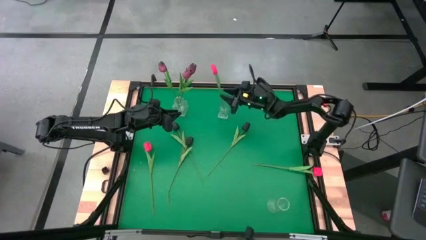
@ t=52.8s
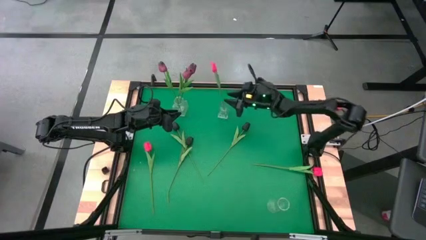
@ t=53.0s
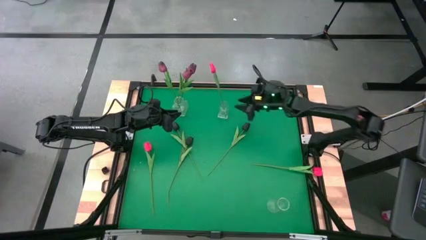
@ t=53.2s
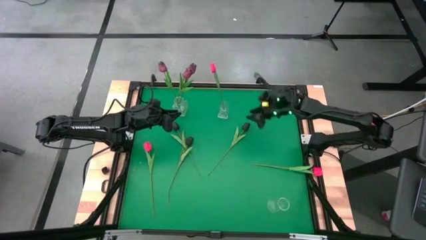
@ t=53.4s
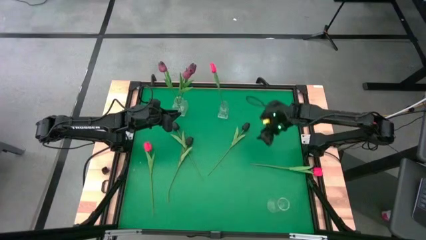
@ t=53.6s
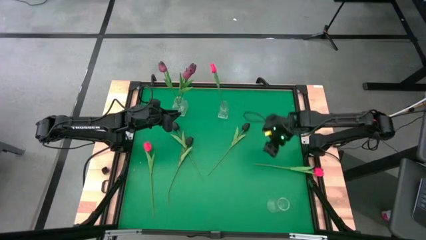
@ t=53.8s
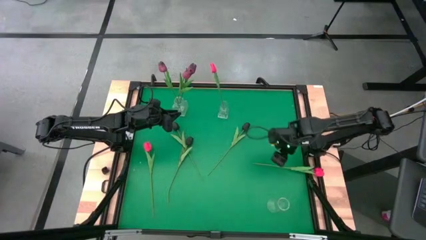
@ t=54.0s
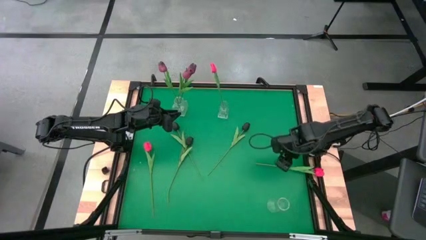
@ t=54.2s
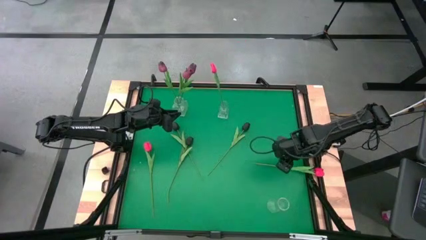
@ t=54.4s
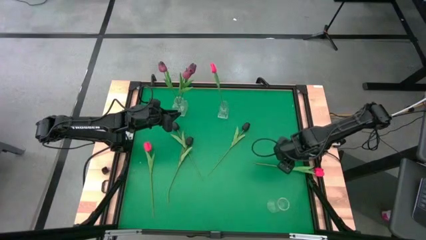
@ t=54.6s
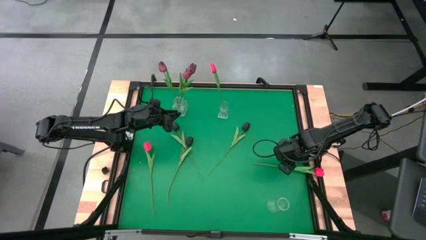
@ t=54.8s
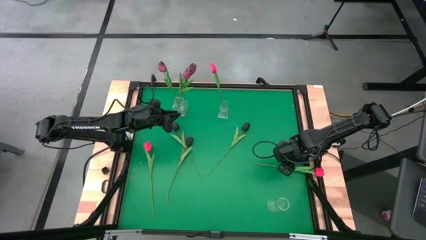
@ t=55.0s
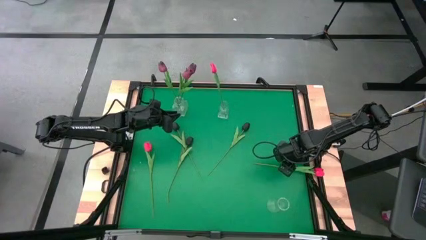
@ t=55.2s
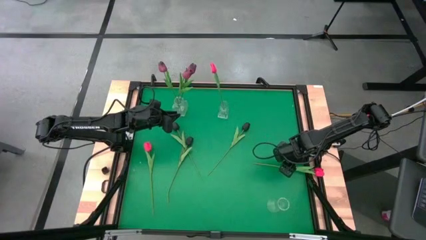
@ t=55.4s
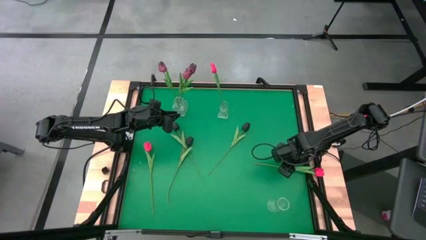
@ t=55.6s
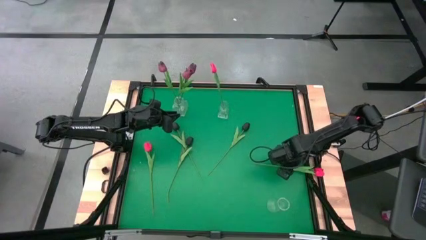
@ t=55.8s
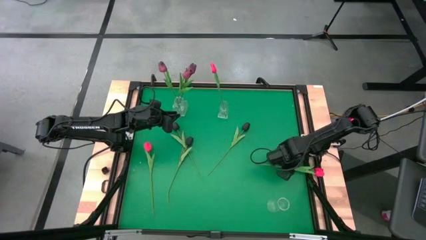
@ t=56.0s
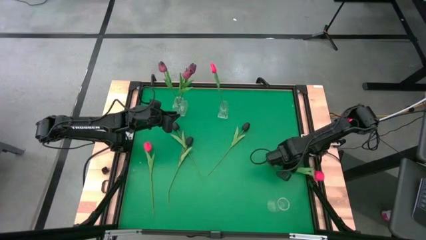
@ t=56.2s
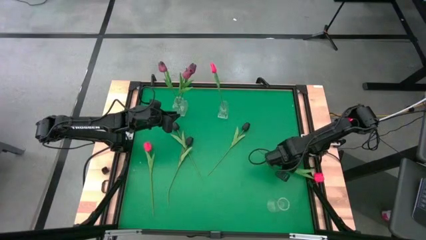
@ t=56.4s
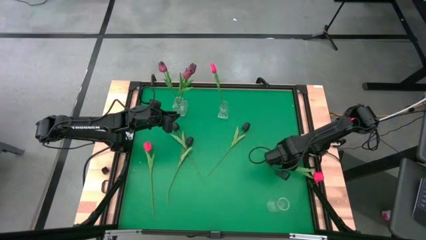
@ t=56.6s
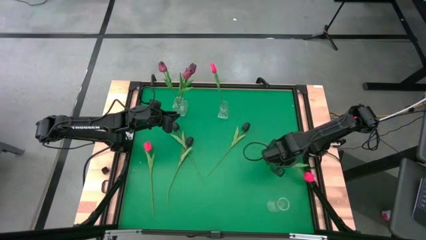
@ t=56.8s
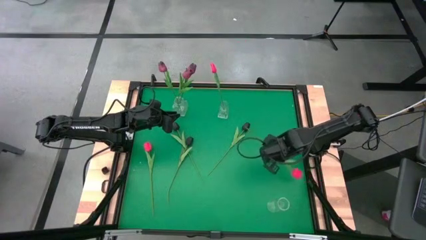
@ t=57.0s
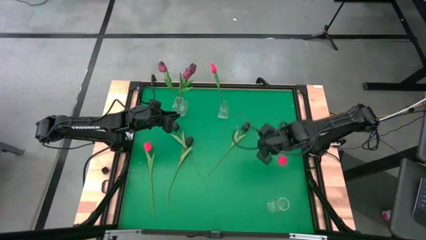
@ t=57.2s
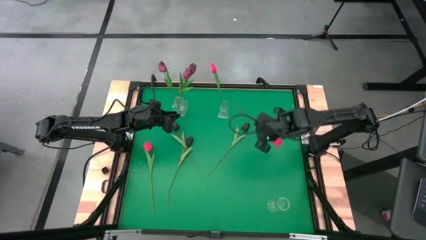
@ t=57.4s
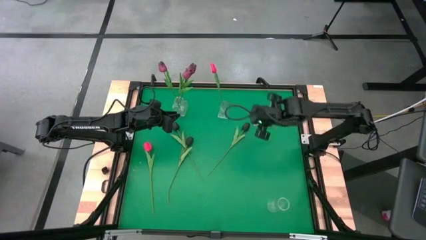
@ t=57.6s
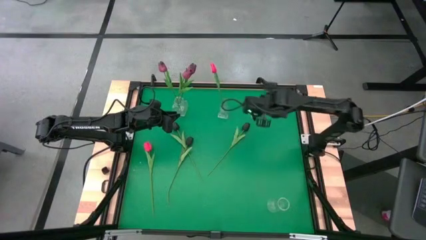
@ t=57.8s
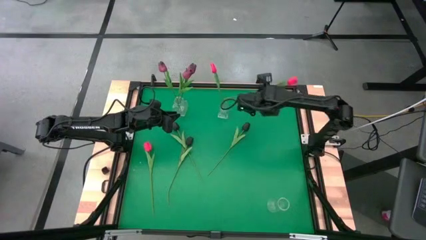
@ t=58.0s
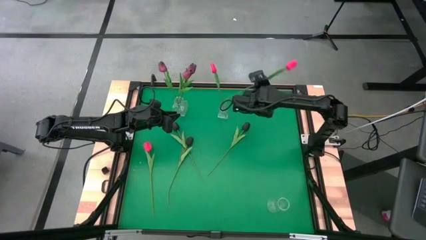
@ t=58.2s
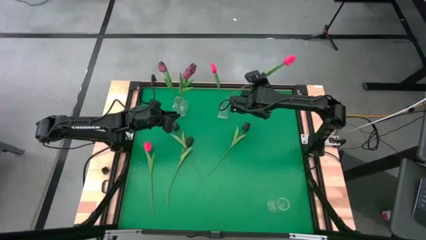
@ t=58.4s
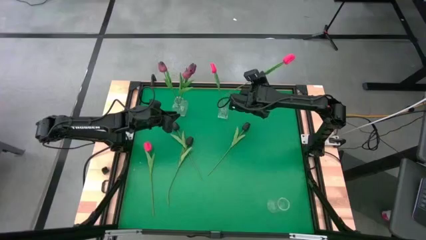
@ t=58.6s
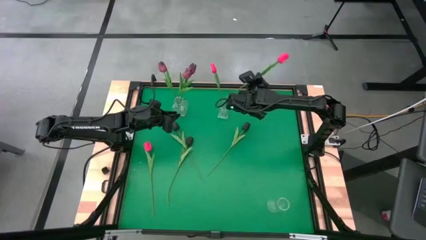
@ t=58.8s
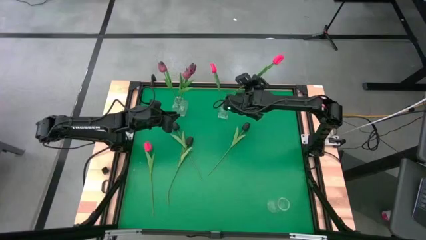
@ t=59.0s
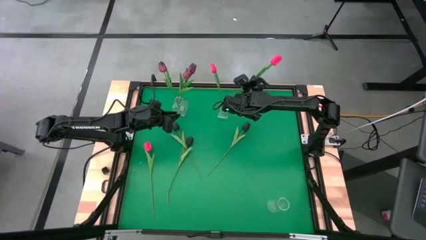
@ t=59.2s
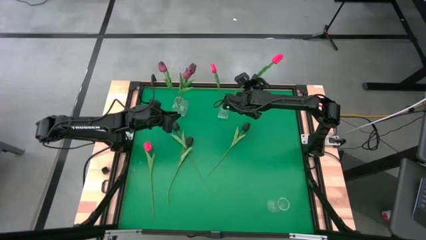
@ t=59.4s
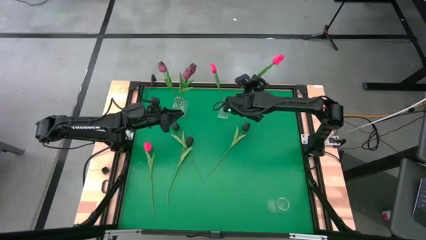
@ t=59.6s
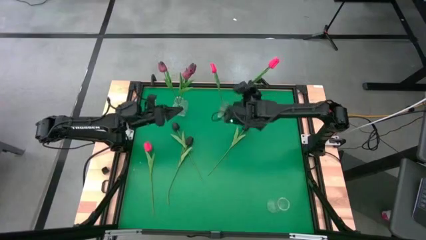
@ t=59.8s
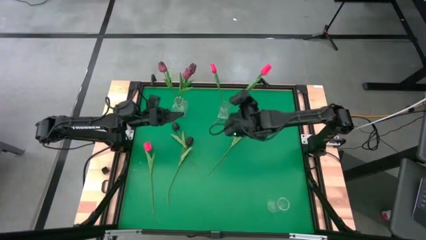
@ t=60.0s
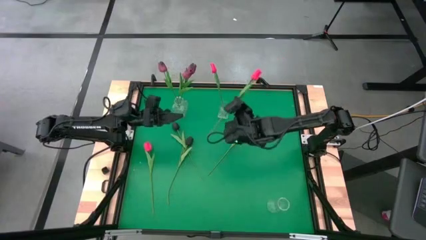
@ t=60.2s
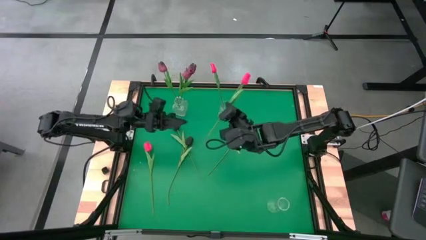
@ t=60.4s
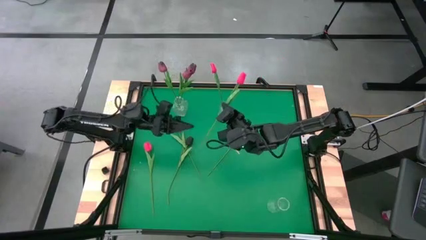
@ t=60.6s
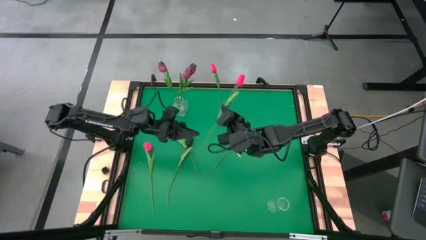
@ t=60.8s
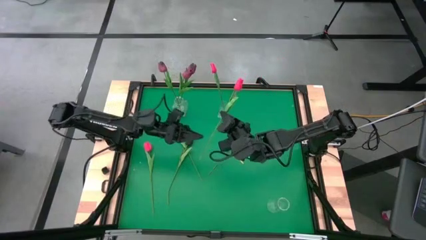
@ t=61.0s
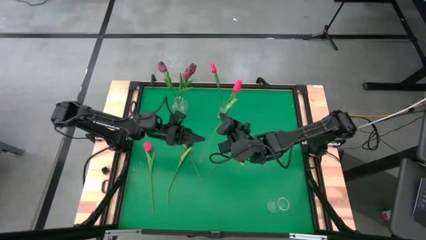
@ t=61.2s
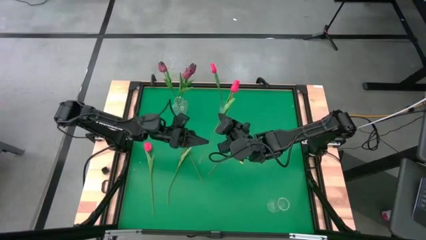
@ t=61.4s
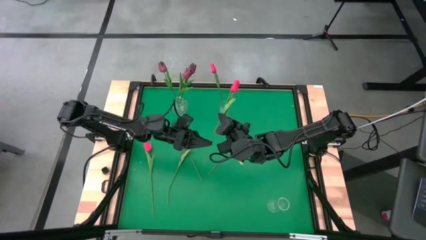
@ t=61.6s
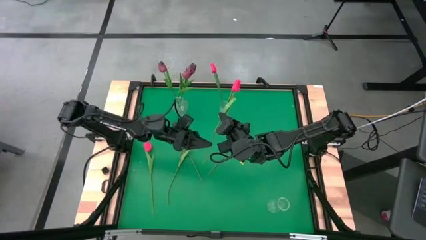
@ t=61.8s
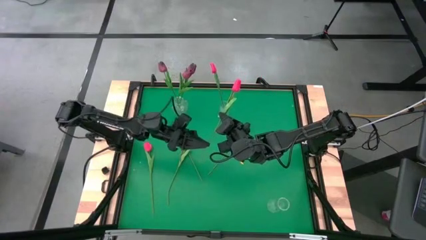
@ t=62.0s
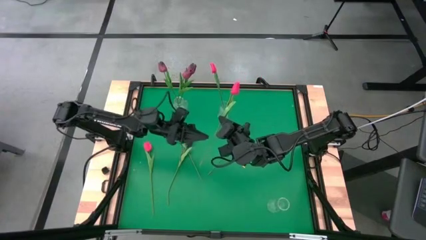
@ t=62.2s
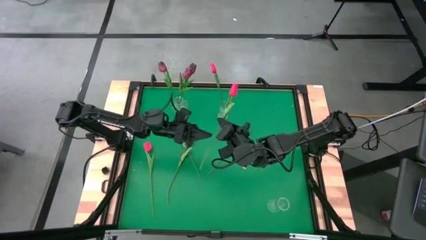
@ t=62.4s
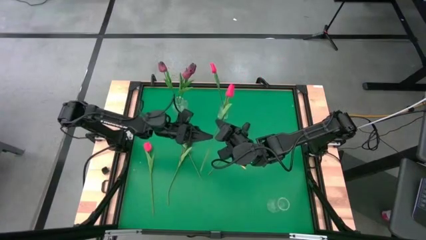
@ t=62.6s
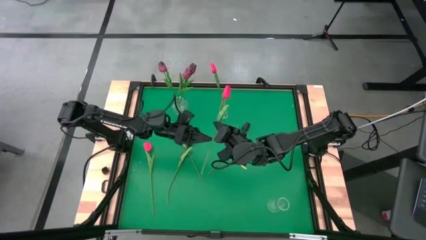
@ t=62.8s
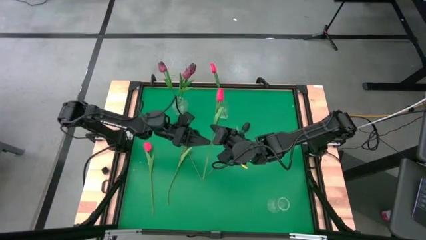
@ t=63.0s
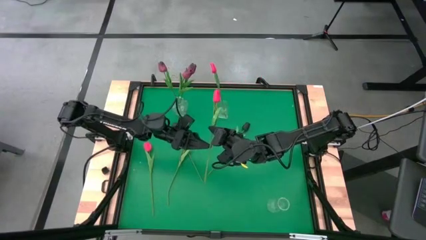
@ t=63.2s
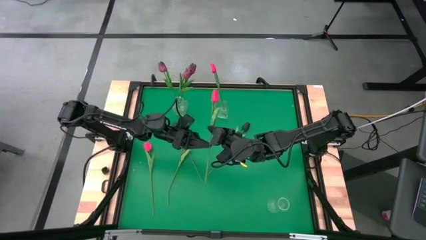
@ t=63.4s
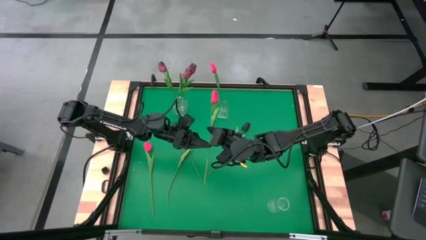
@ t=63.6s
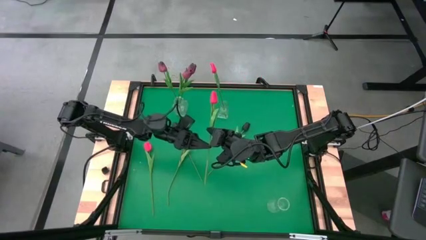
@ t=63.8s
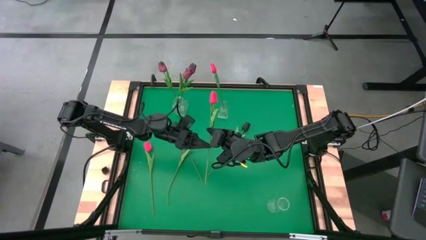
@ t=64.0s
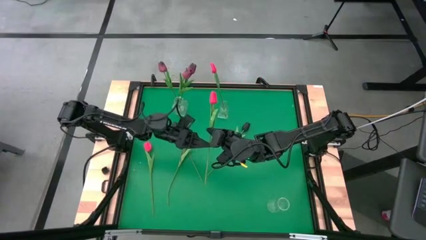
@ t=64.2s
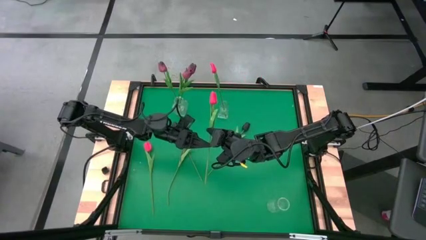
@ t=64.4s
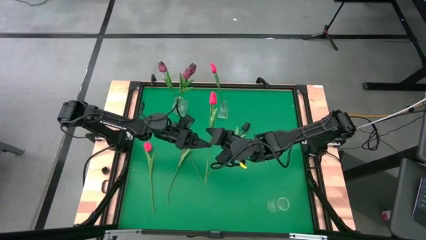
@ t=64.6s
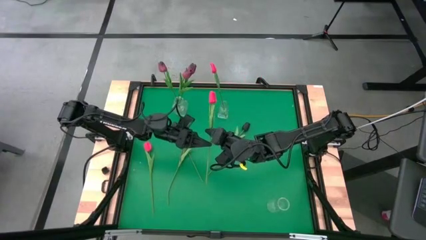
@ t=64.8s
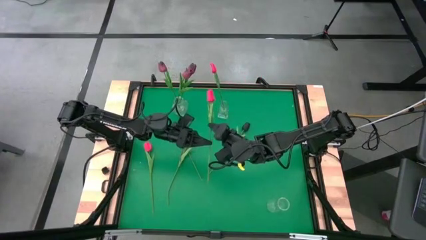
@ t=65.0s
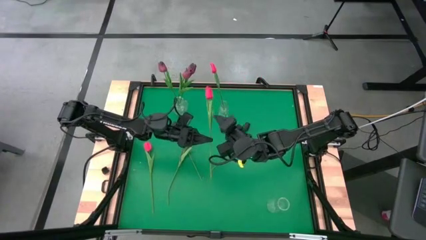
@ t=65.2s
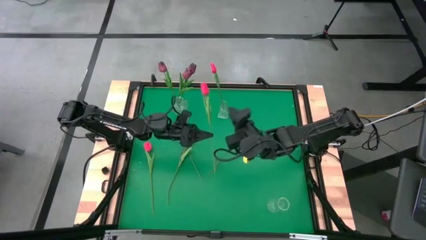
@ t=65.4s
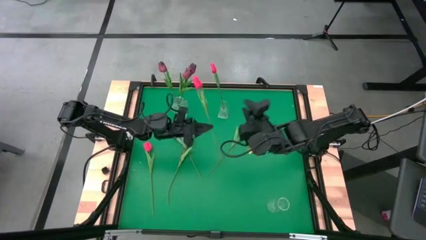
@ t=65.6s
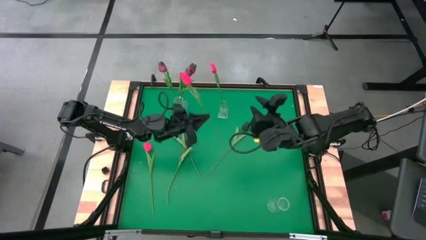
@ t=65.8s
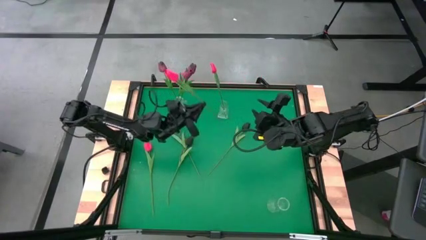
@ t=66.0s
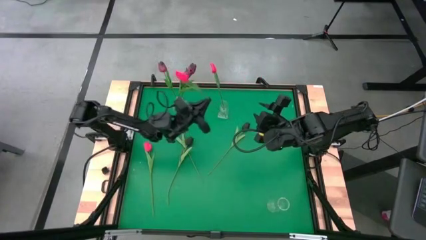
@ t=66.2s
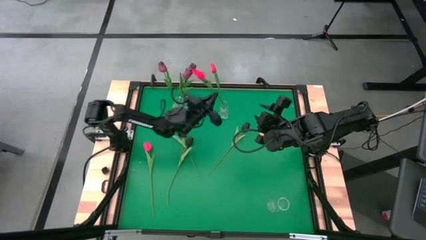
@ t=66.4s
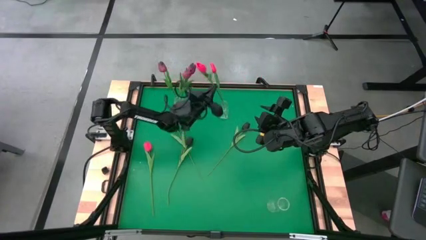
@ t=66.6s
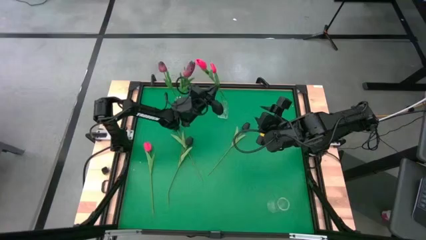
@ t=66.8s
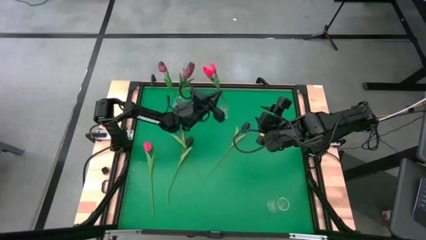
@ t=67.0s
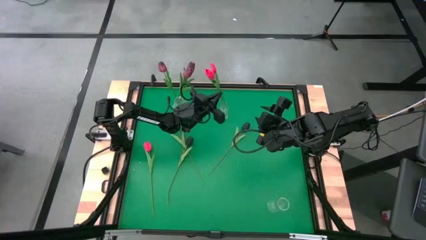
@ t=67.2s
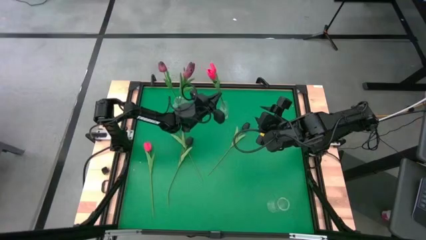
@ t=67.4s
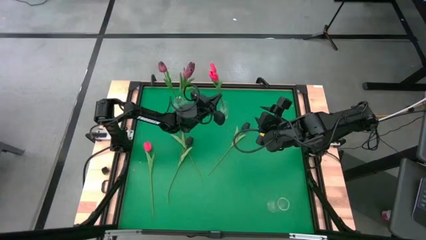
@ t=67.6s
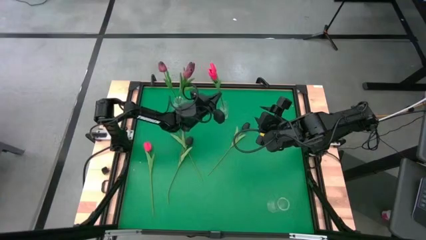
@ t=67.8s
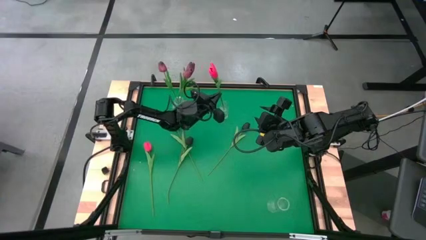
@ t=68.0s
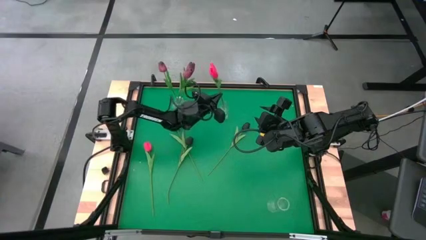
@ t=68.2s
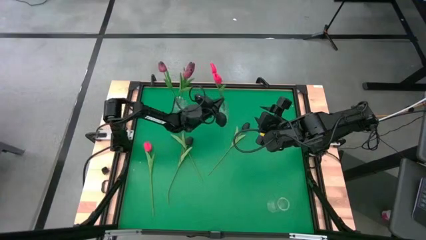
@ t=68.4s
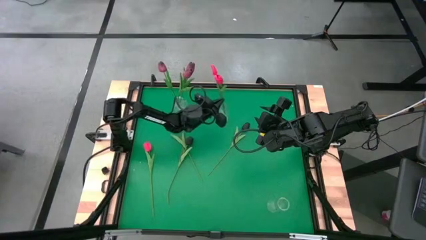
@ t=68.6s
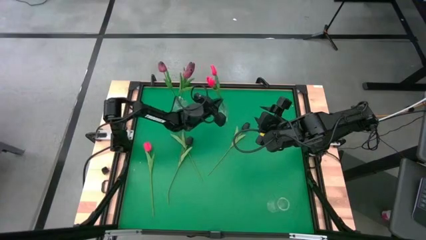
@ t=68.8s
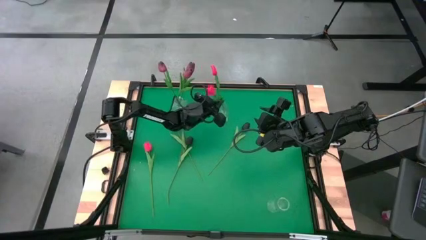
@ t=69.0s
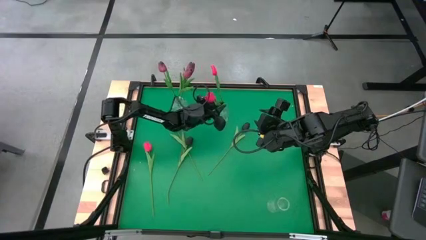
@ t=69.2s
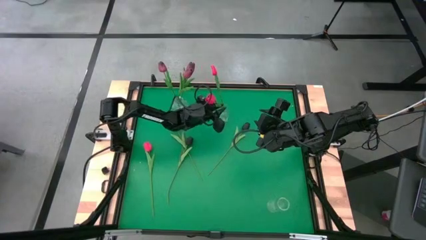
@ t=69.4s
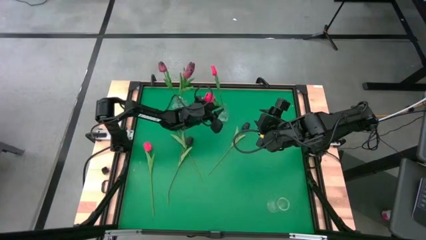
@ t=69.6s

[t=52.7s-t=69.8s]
Task: Sort flowers into vase by color
Put the right red tulip into the top right transparent vase
